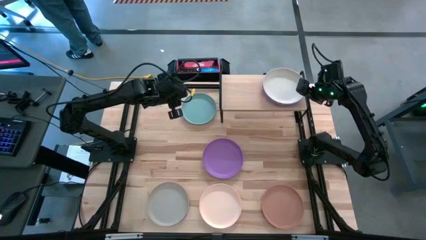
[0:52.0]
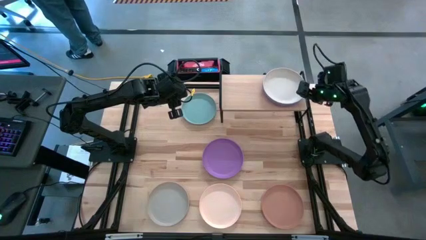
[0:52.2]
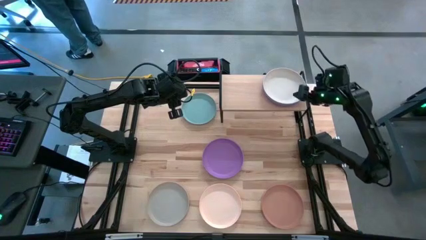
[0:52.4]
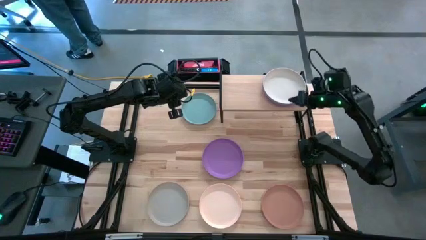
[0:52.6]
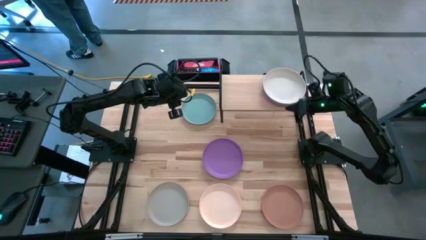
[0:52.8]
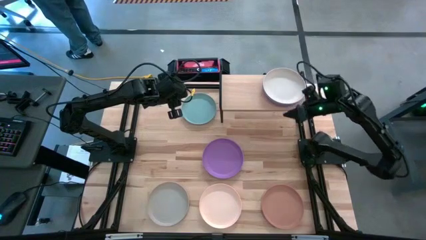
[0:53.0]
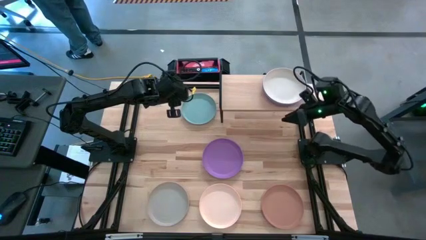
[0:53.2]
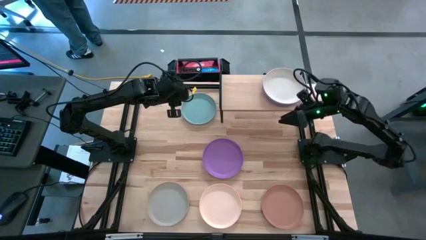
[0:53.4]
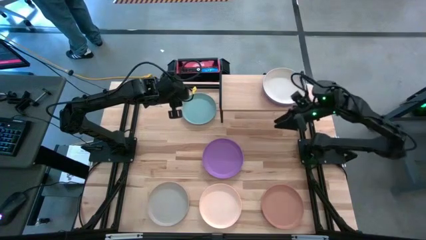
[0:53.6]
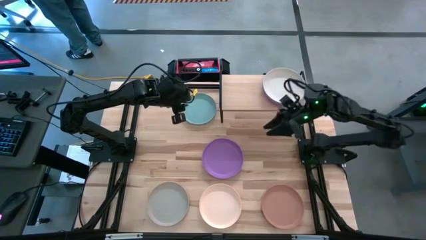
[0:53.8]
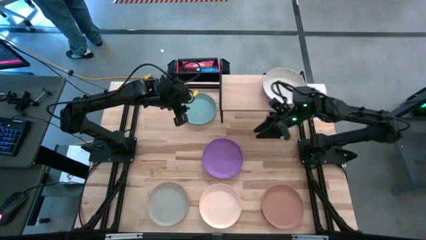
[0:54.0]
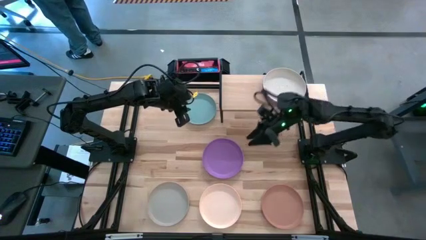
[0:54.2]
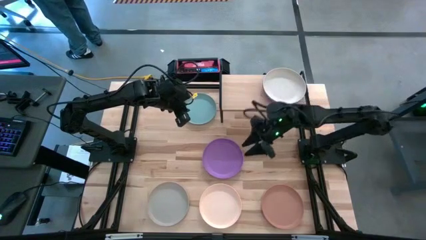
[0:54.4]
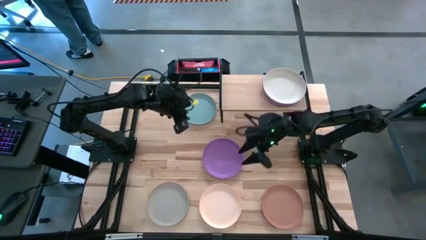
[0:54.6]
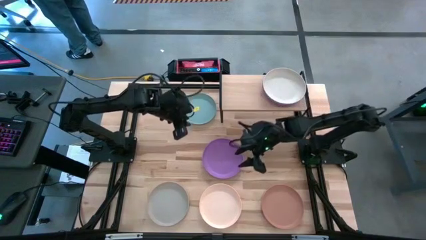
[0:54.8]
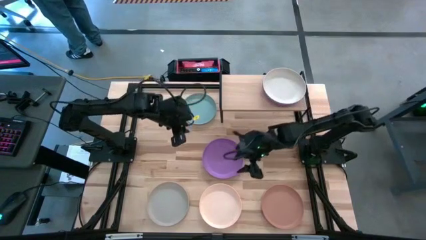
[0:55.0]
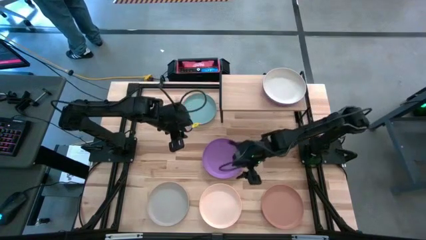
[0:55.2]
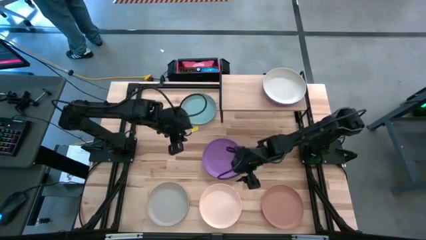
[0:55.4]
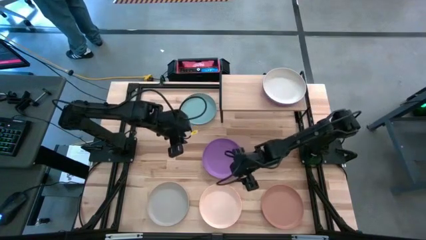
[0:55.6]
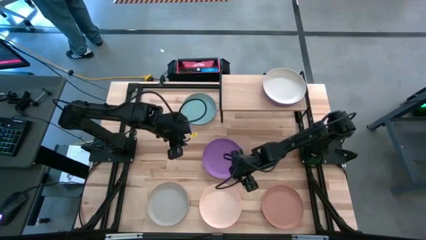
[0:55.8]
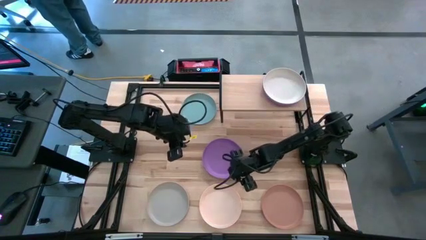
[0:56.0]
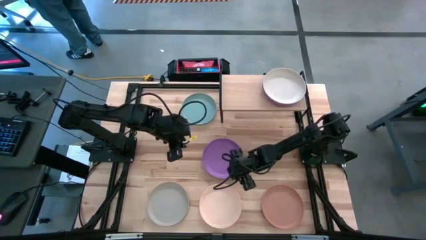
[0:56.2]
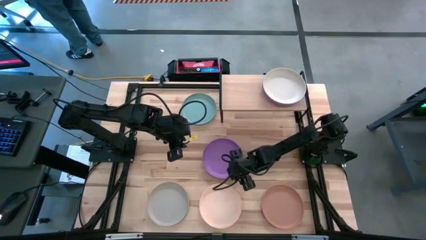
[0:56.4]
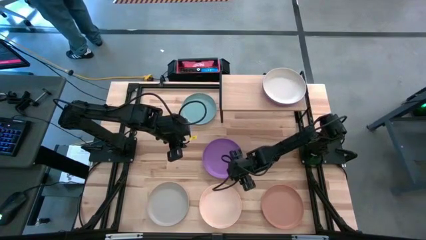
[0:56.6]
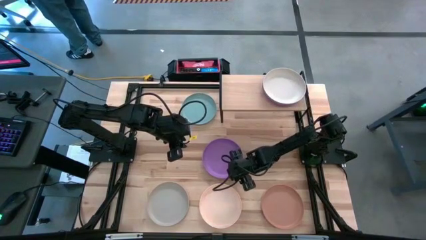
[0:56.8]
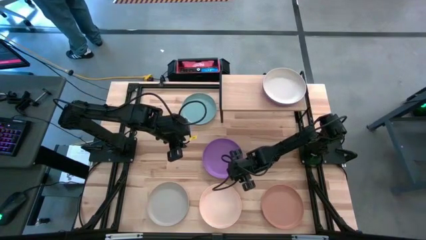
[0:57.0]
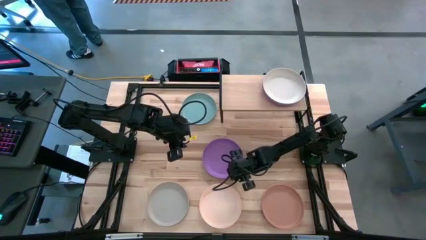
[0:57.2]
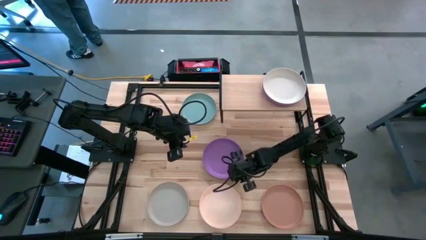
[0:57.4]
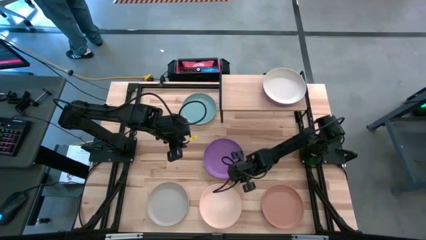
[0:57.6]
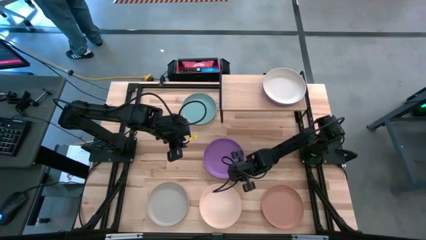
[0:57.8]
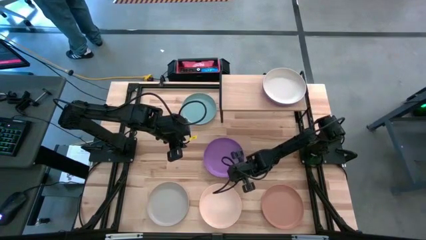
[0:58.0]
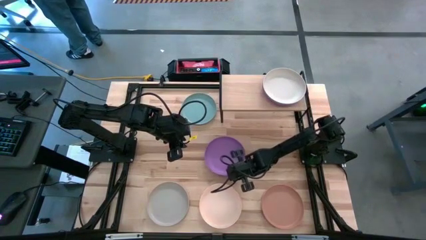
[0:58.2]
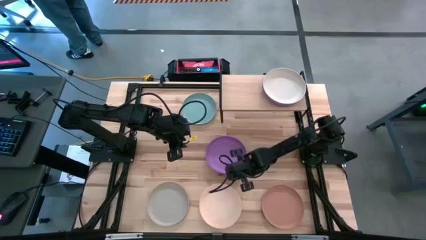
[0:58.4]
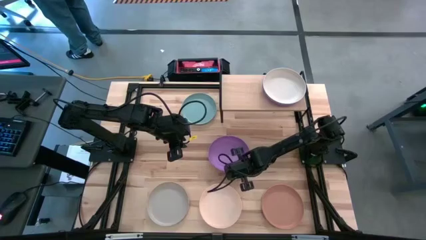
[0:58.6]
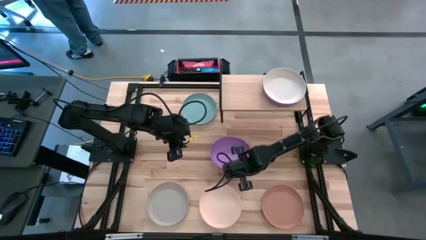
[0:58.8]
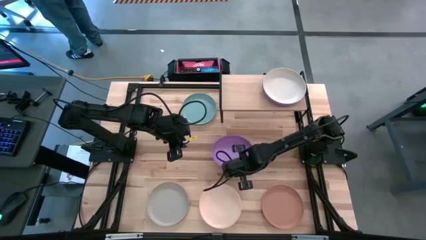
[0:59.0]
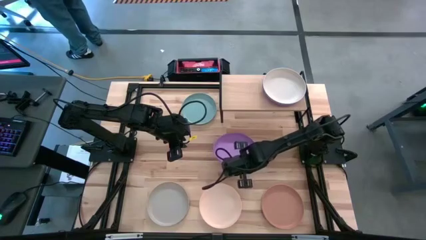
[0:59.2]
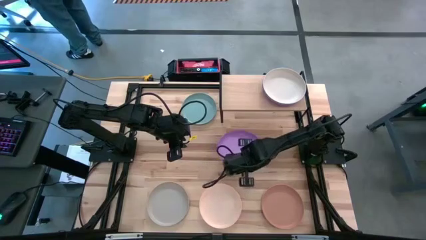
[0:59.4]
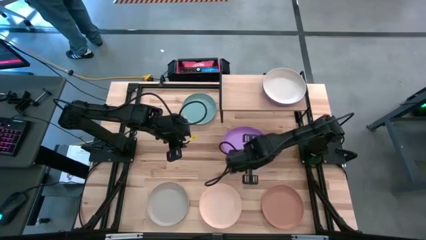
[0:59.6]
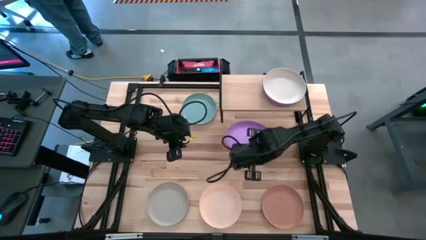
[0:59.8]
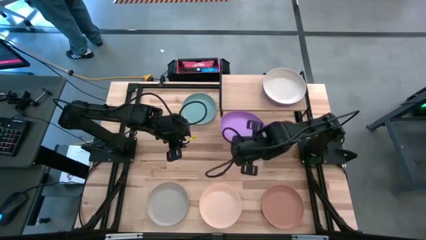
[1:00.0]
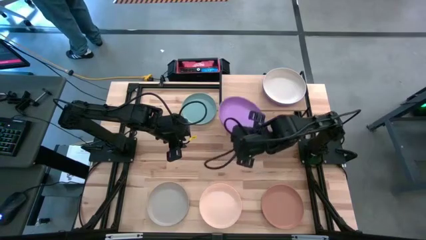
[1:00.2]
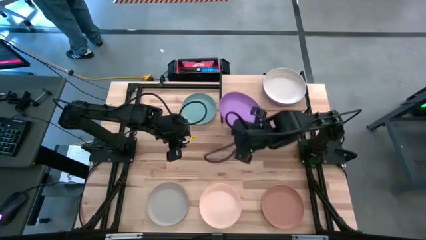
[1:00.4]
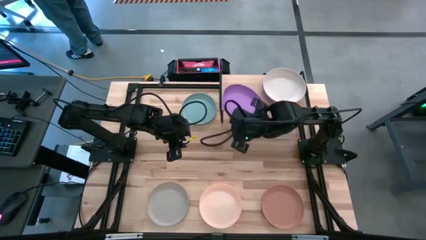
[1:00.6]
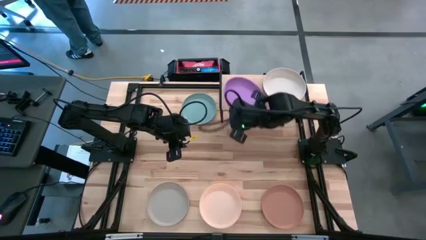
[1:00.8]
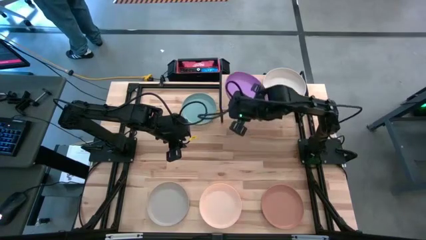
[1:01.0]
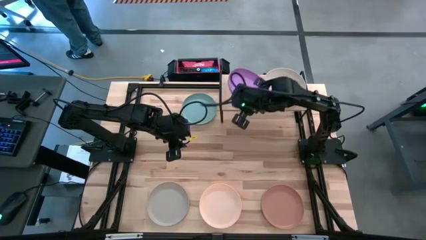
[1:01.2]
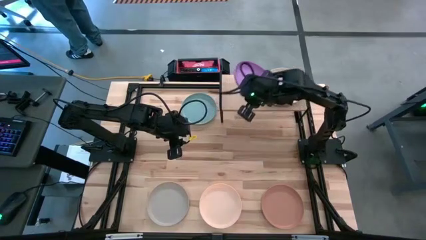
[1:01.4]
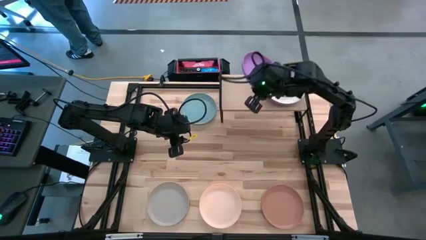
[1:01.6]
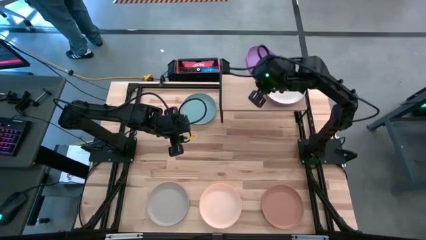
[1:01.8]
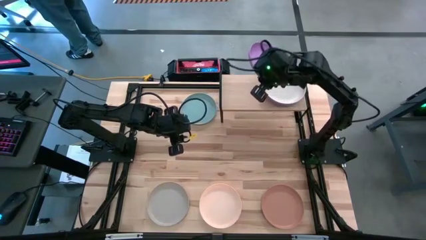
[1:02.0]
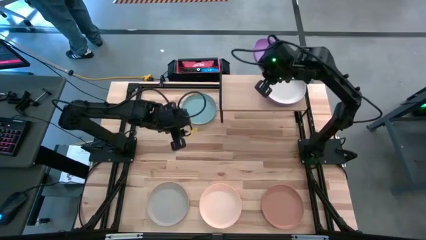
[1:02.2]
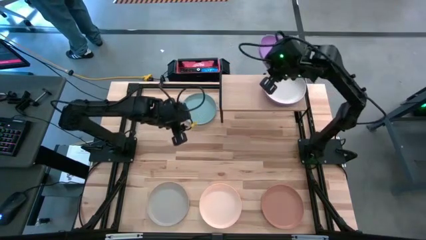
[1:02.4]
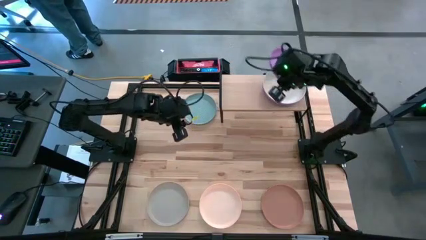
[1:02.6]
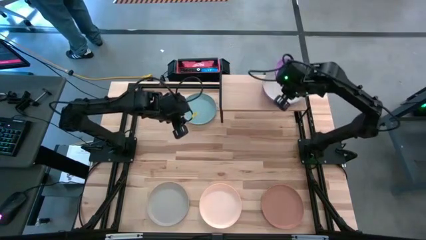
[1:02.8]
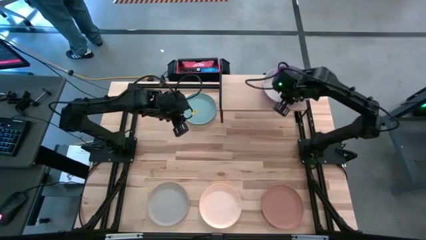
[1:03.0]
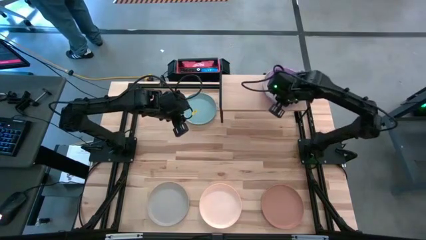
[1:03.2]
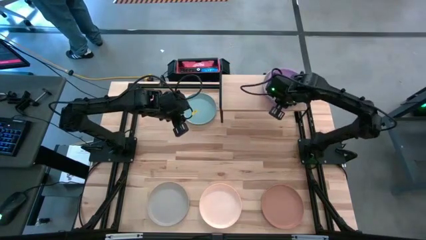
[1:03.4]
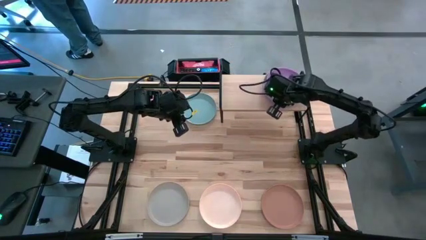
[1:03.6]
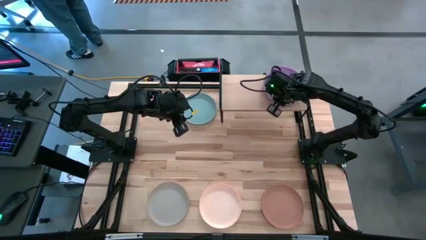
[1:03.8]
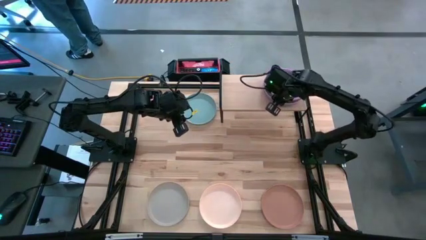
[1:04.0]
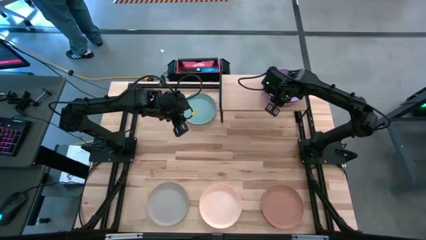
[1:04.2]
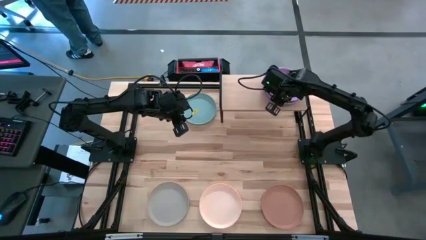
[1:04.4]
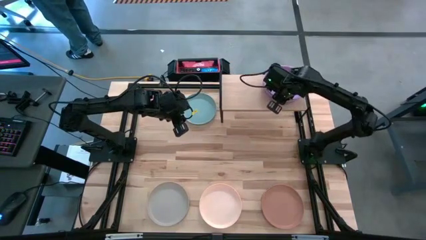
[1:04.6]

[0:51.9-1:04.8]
Task: Place and stack plates onto a shelf
Stack the violet plate on top of the white plate on the shelf

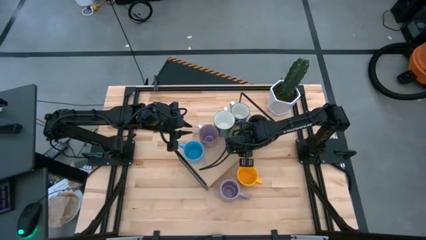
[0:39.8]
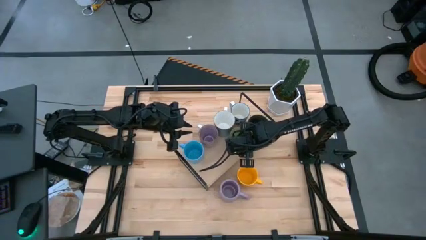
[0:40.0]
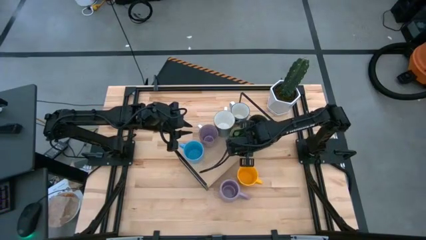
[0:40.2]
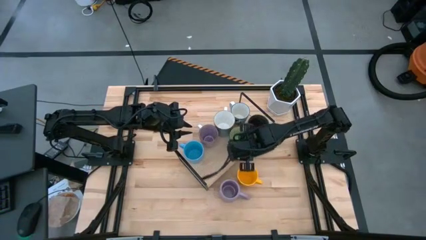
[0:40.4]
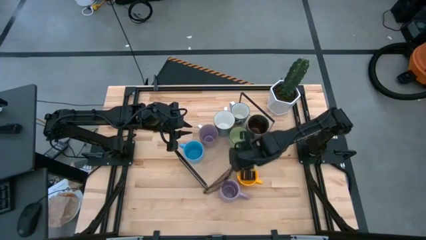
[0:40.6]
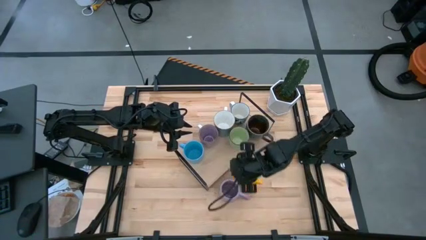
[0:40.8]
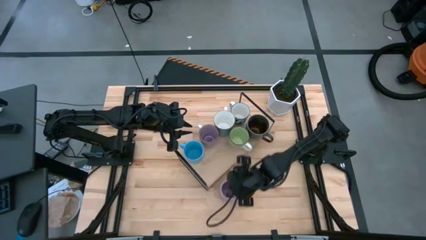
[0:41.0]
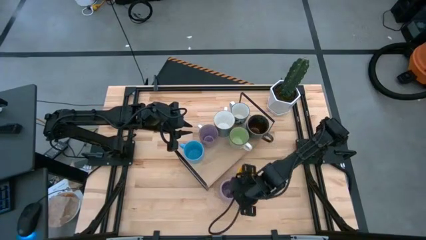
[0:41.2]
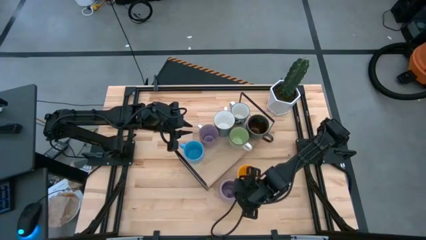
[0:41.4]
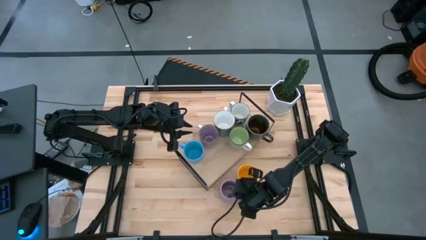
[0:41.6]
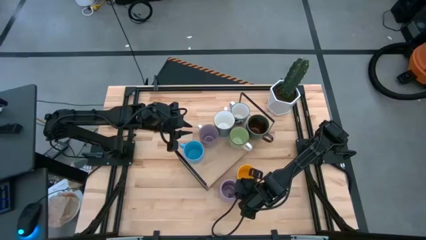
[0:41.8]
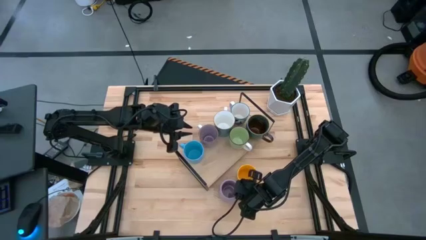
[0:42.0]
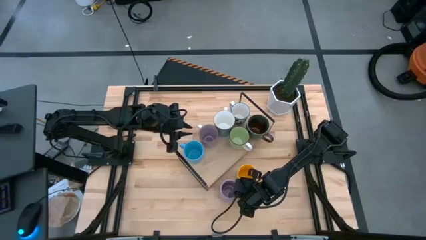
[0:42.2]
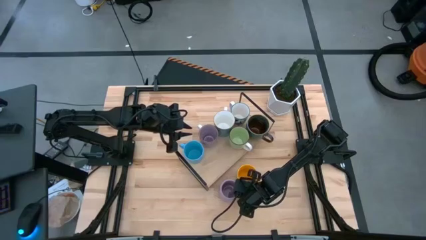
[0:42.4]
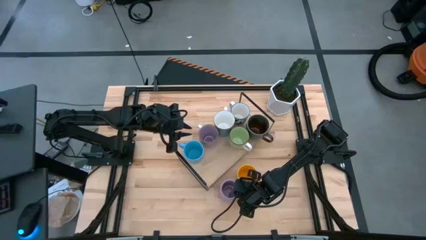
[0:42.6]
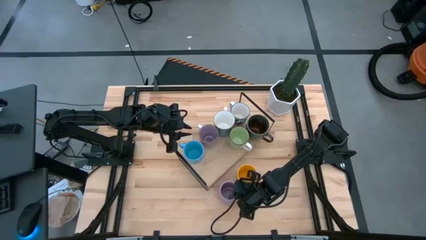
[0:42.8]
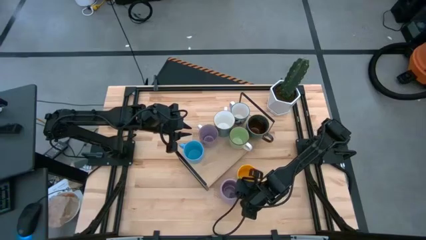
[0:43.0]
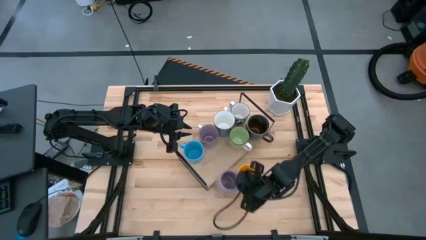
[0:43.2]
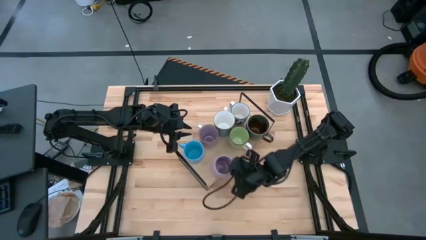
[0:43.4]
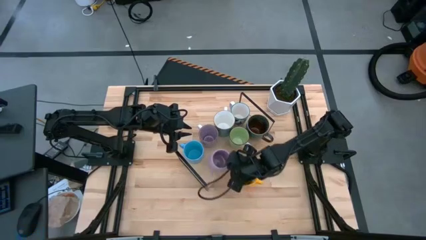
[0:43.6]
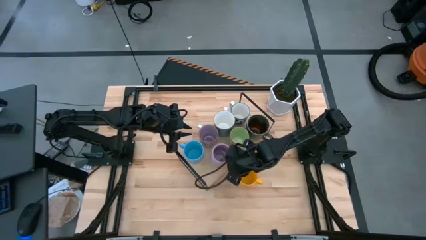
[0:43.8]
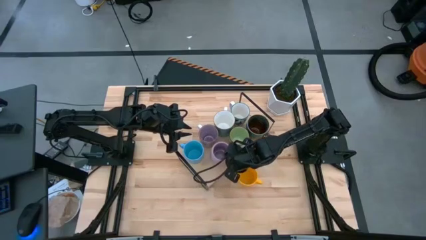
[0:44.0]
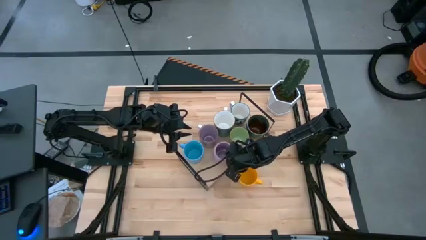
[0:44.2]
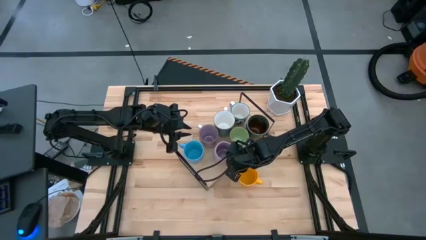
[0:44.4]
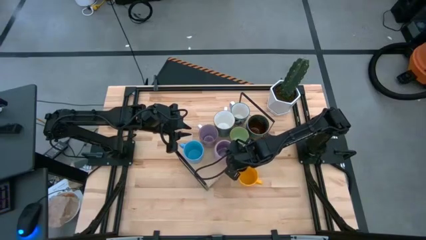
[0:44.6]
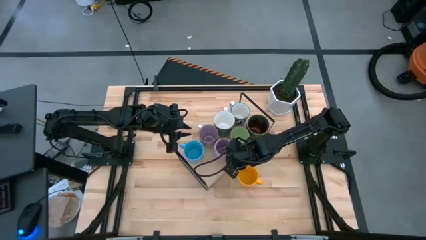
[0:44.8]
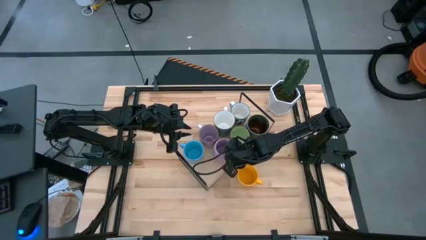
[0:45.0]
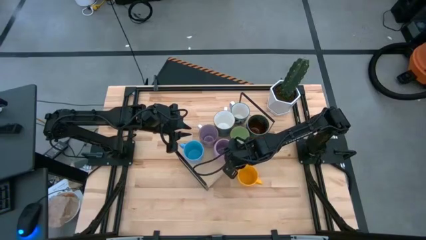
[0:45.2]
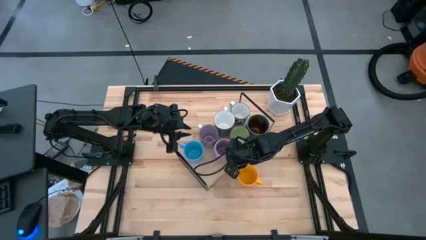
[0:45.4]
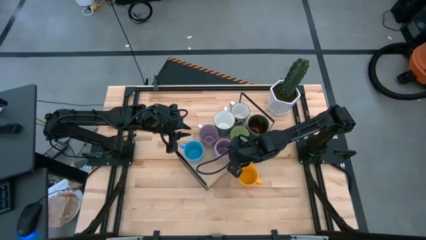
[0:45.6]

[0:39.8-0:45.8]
Task: Place coffee mugs
Put the violet mug on the shelf
